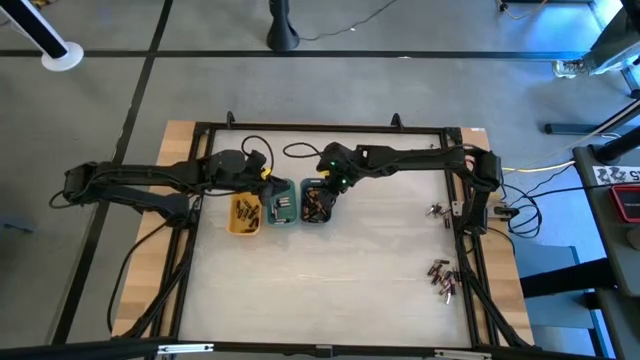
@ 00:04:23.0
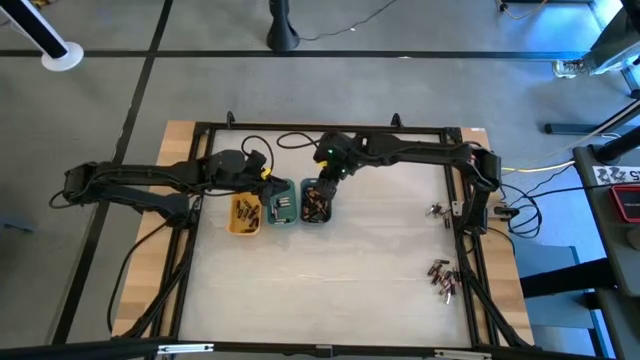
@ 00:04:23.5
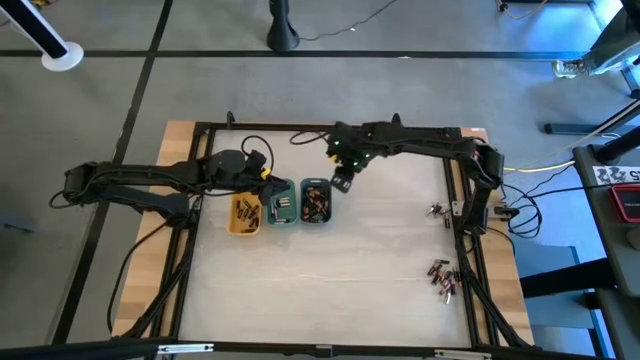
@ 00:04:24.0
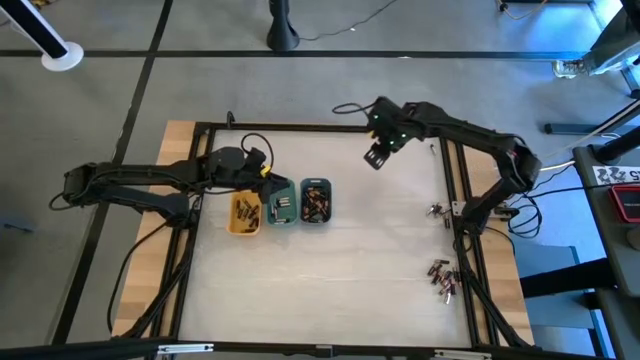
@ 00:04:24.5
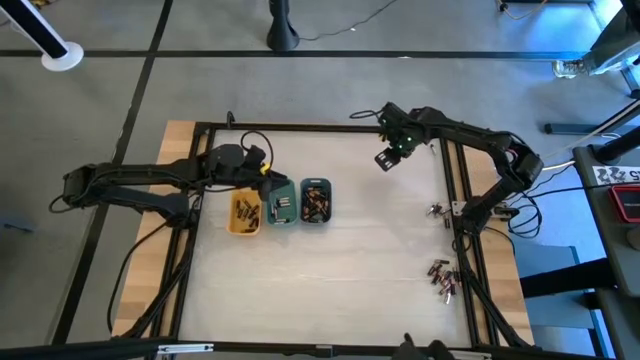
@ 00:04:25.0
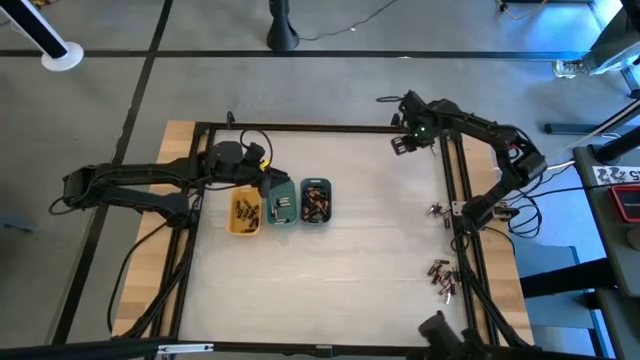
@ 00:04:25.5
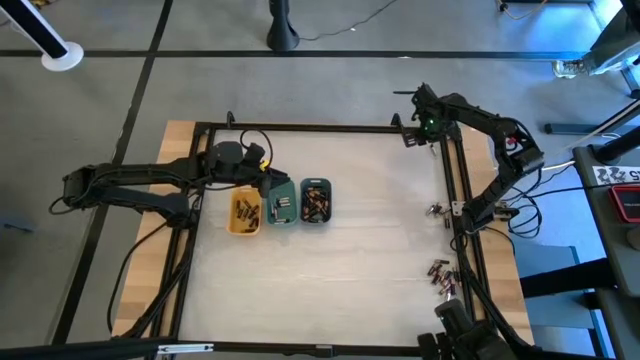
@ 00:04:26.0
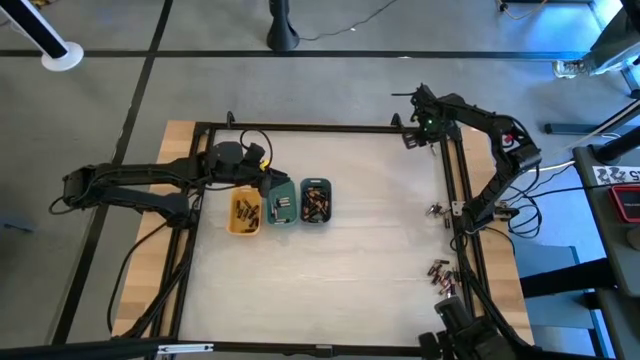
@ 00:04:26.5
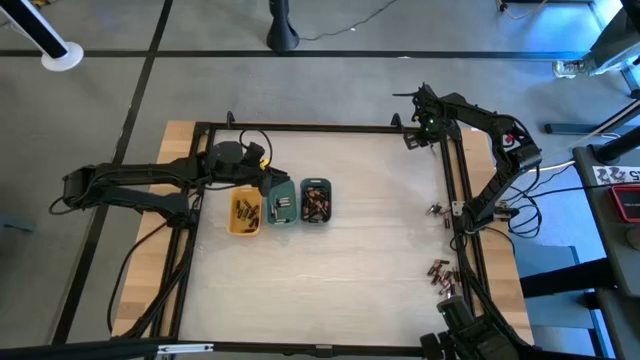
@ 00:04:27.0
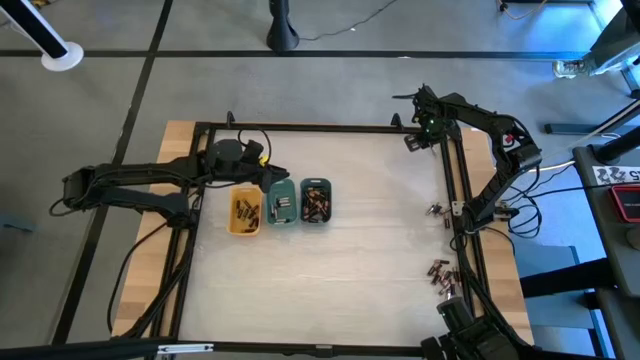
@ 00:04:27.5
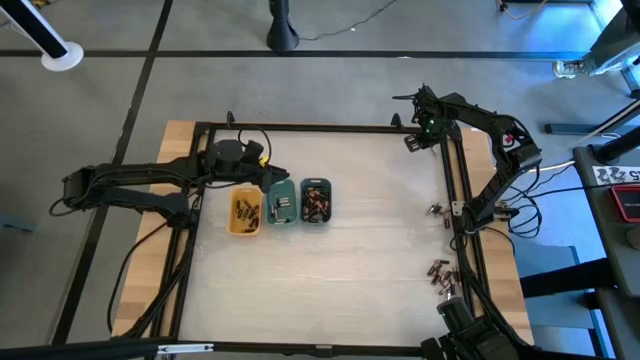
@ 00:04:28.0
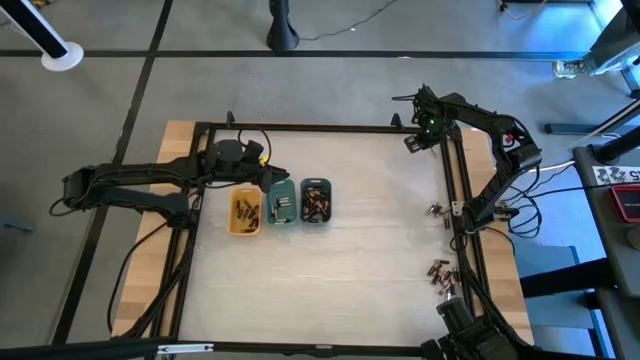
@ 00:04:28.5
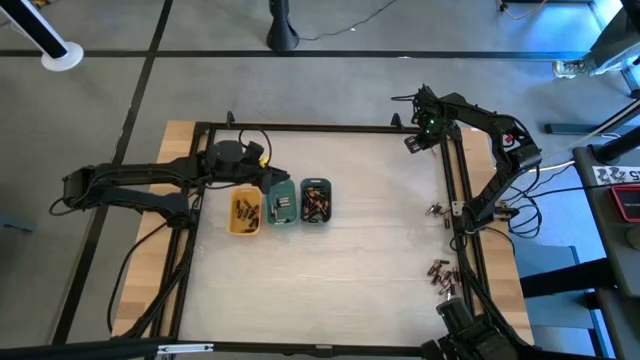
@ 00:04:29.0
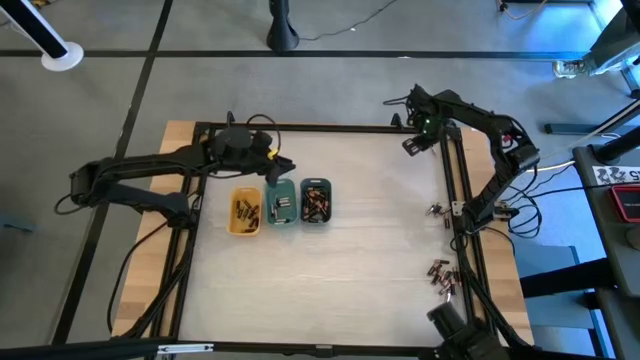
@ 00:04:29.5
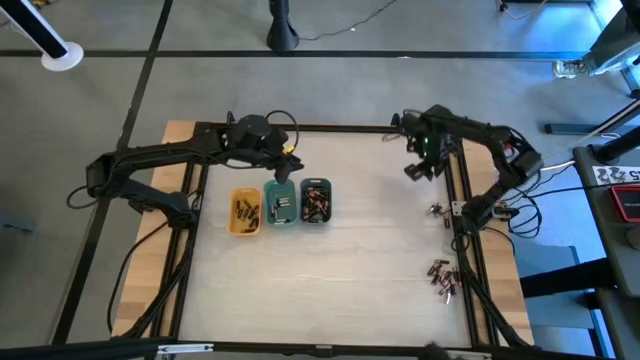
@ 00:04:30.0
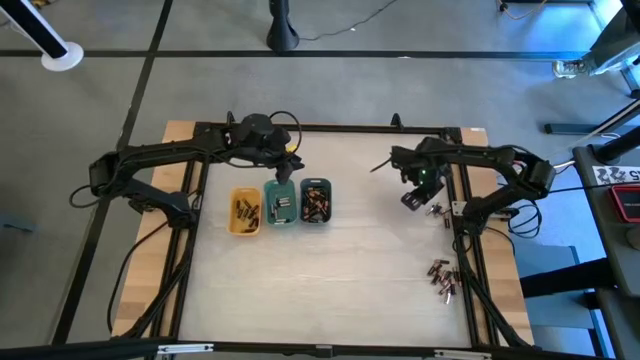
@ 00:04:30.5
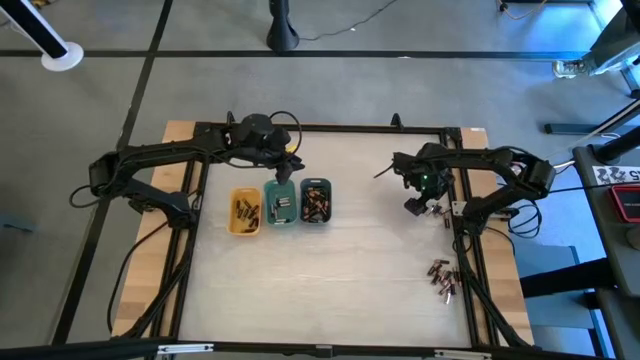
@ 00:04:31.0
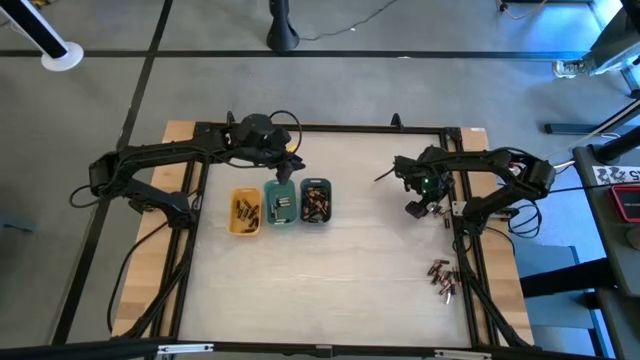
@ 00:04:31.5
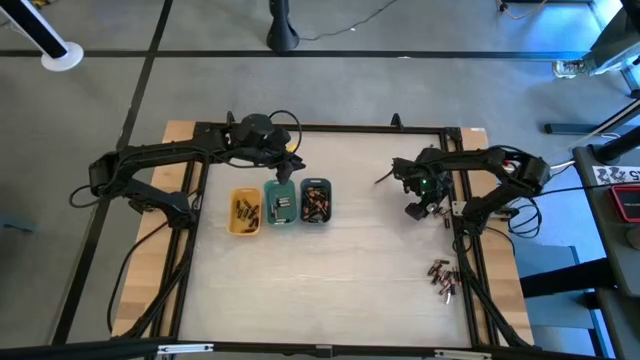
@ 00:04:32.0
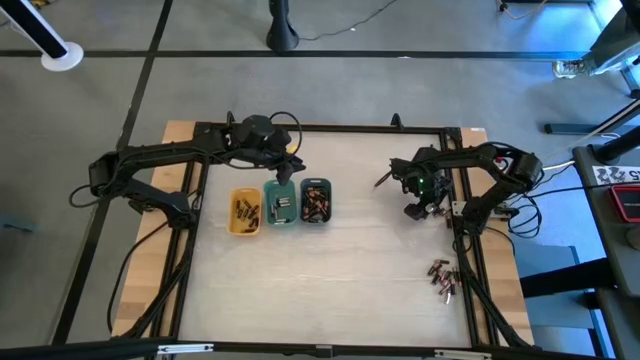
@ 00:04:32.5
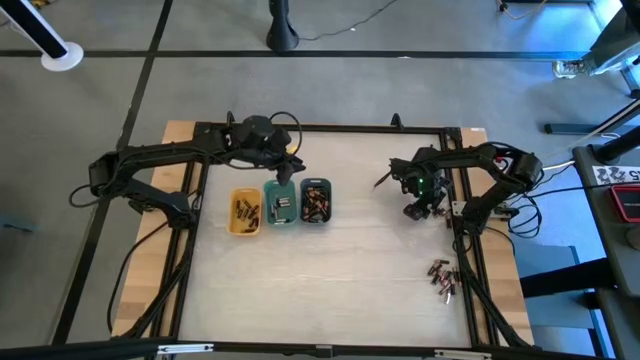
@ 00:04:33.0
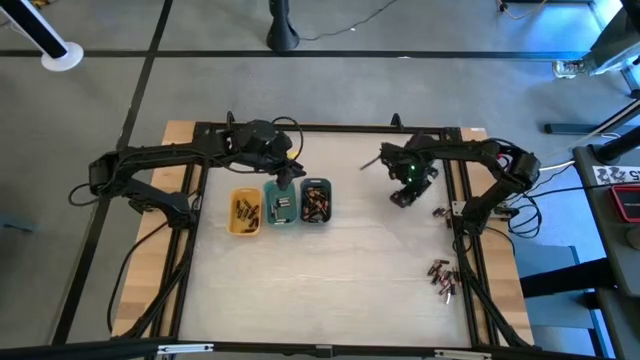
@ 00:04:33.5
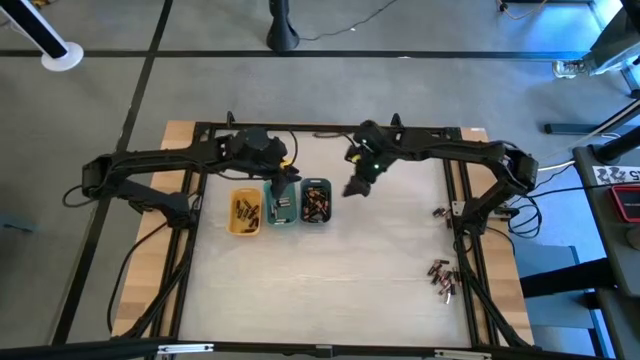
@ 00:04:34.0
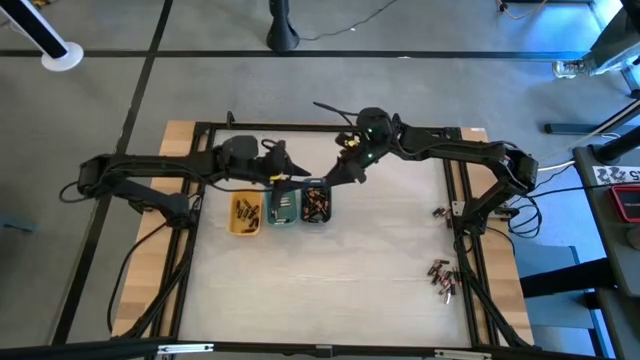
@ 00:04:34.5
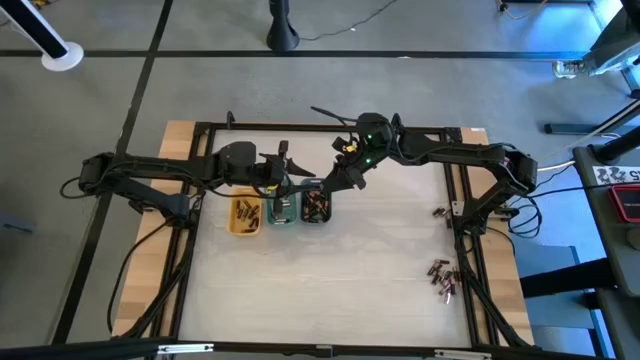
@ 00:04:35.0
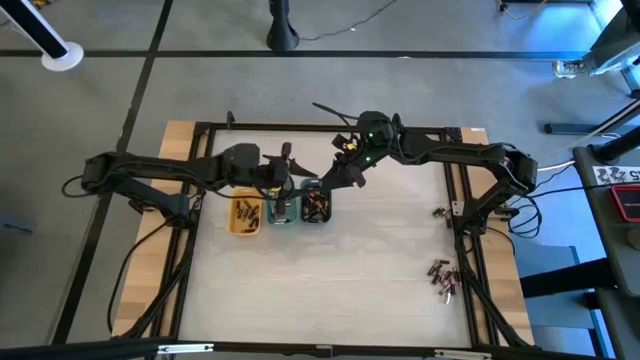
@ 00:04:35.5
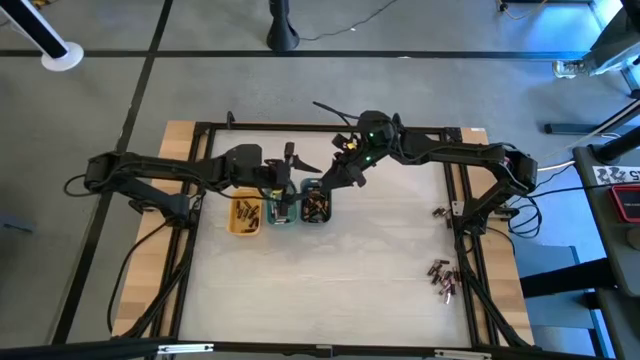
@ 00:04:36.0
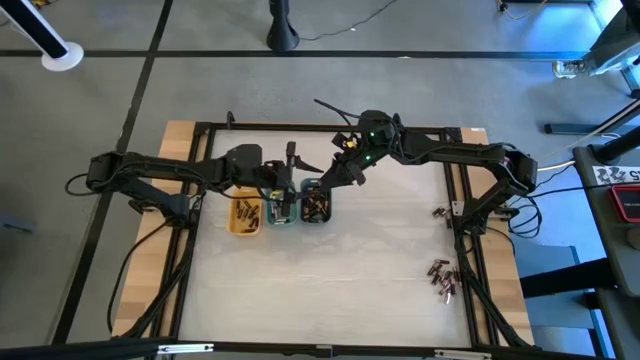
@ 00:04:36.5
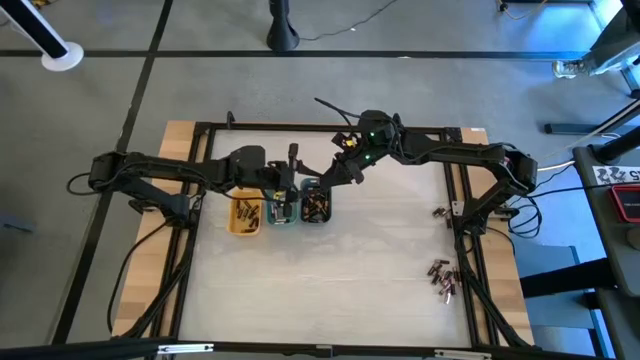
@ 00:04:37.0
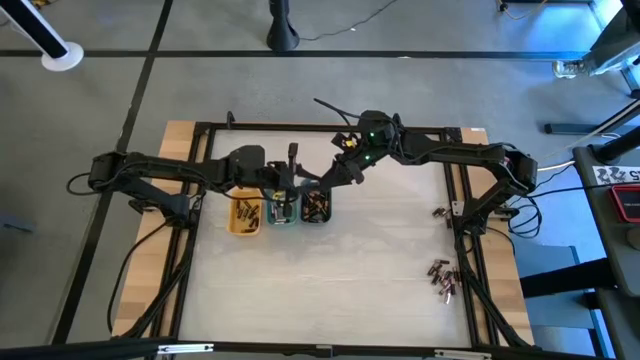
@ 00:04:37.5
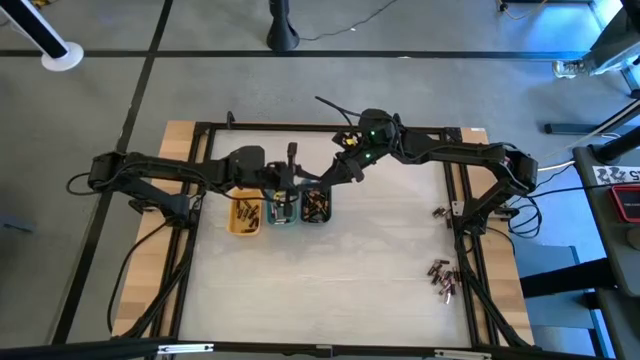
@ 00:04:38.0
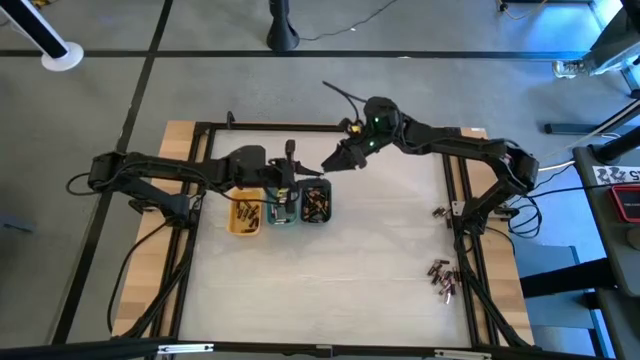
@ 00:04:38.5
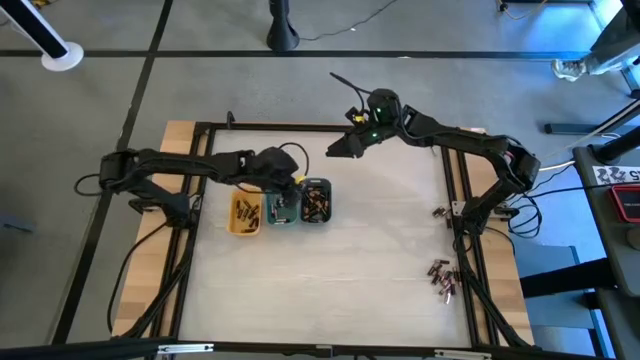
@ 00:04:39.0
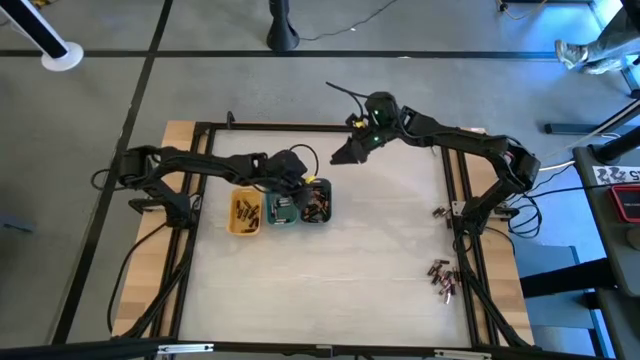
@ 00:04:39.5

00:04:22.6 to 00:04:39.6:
Task: Sort batteries
Put the silver battery into the green bin

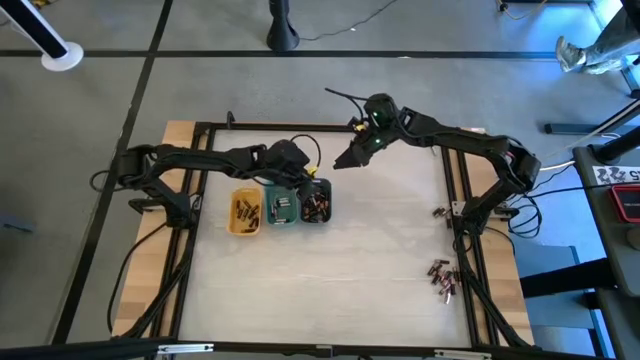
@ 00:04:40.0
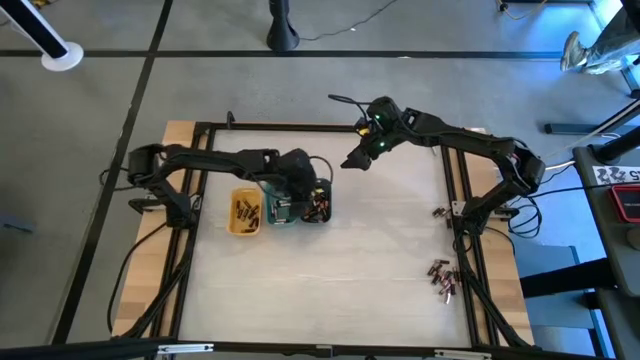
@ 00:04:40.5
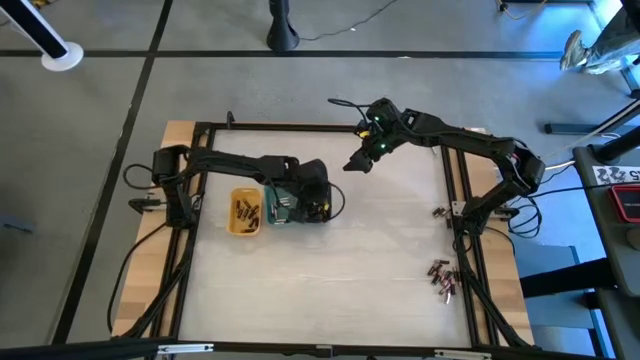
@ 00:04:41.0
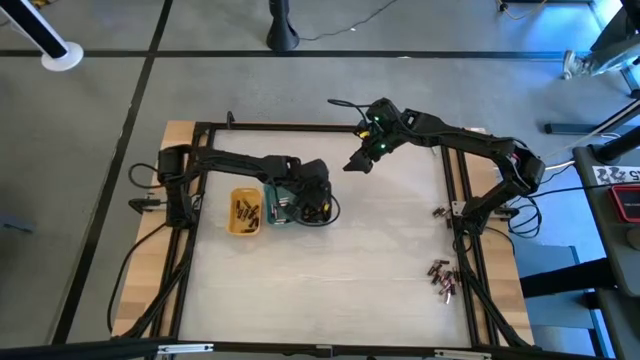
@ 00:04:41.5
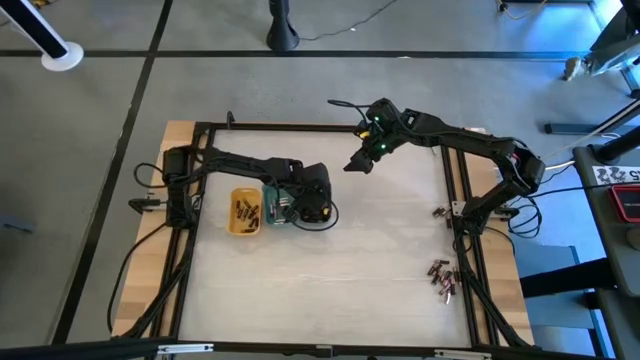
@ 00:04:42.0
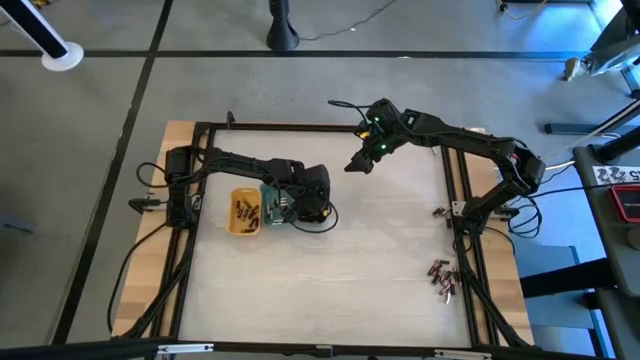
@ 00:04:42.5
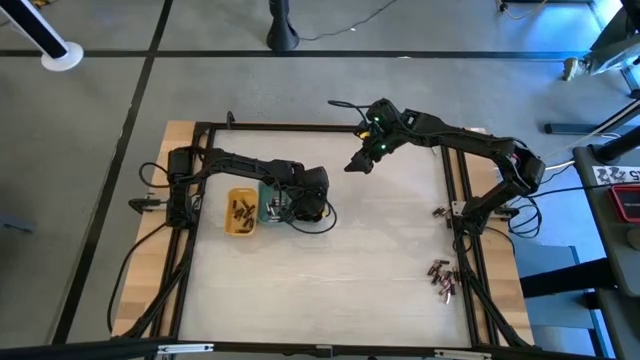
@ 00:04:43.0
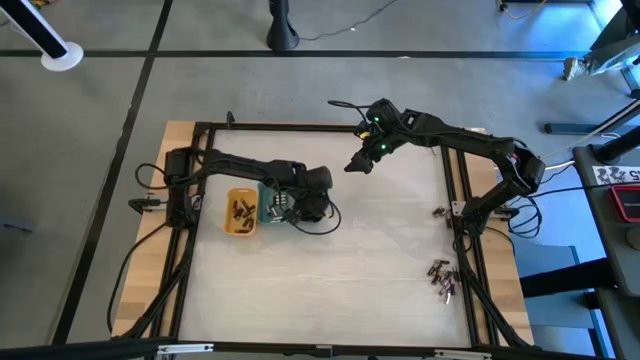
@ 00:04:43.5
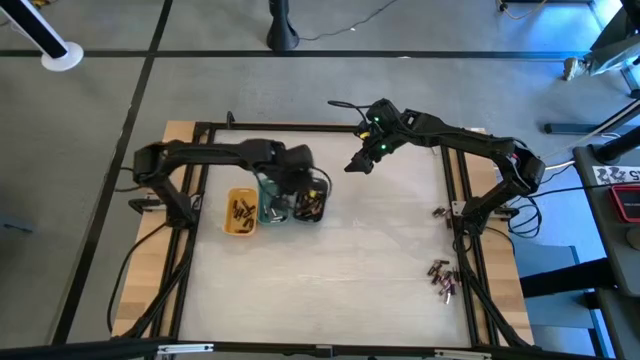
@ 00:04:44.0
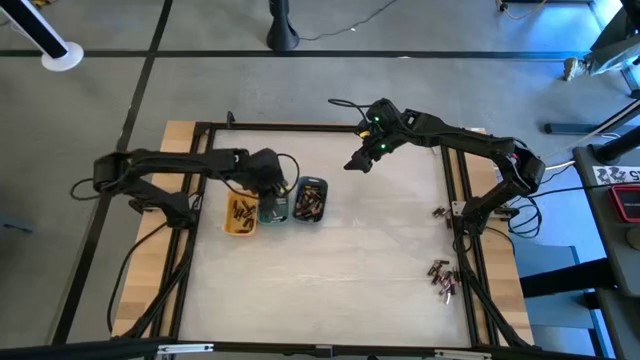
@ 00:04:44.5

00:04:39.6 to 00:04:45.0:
Put the silver battery into the green bin
